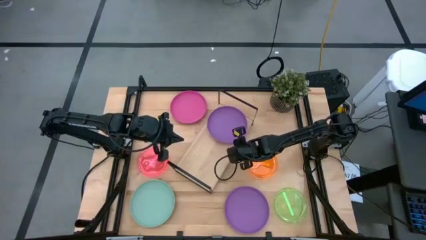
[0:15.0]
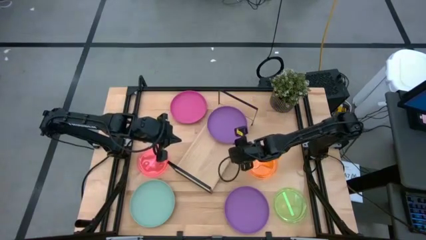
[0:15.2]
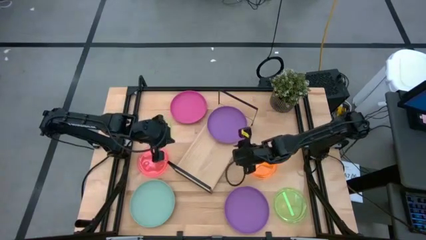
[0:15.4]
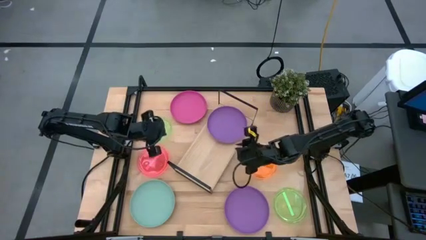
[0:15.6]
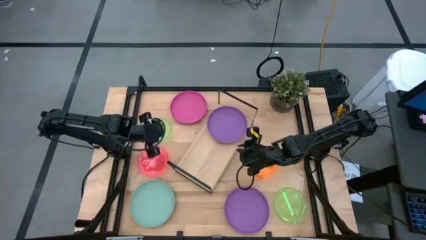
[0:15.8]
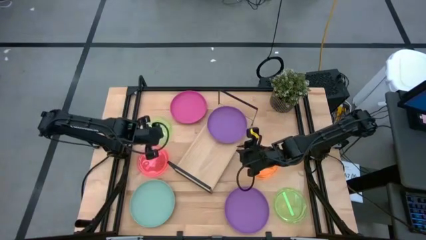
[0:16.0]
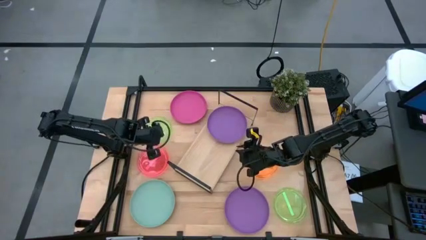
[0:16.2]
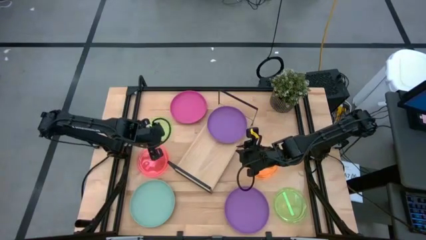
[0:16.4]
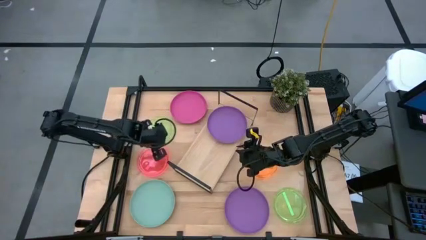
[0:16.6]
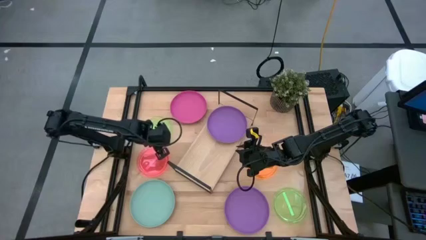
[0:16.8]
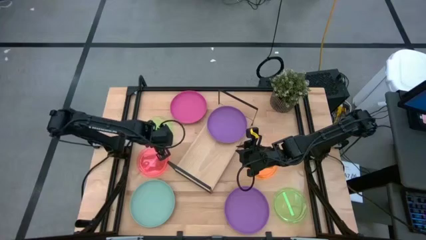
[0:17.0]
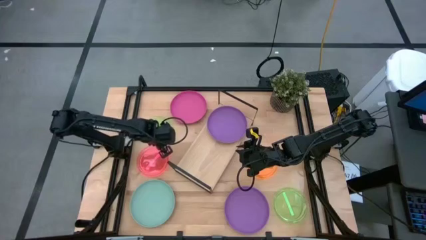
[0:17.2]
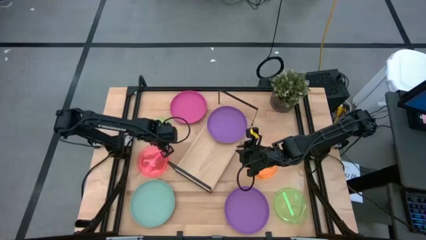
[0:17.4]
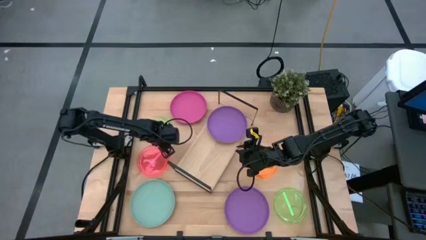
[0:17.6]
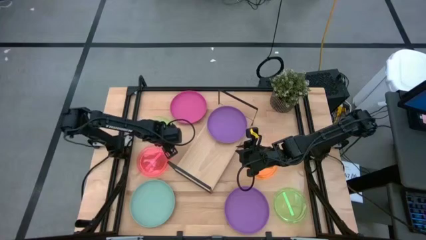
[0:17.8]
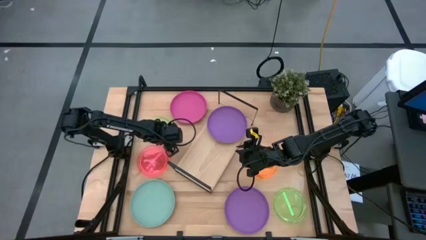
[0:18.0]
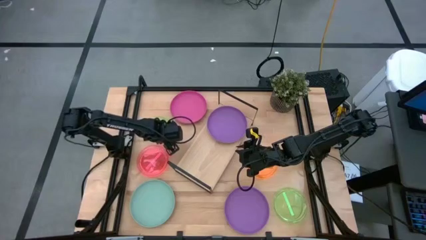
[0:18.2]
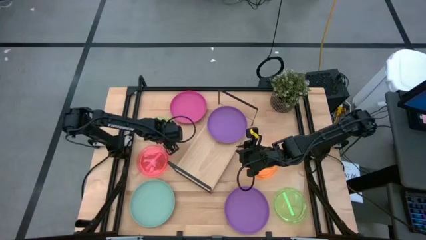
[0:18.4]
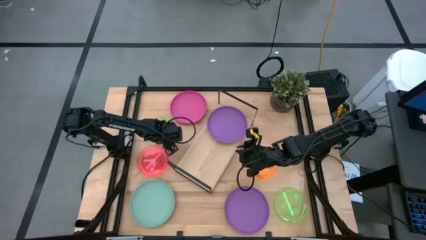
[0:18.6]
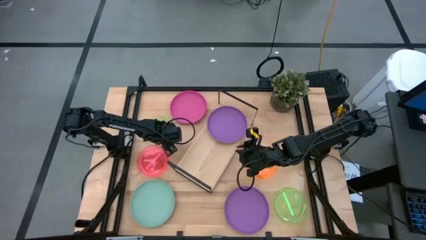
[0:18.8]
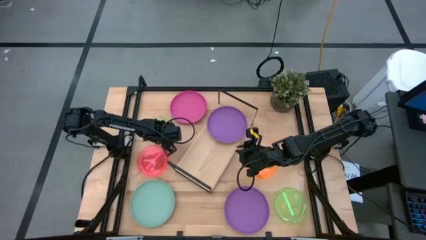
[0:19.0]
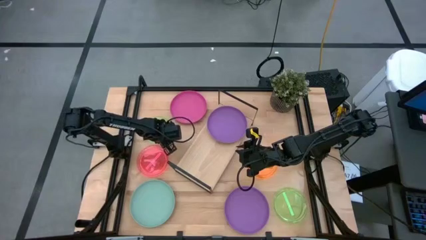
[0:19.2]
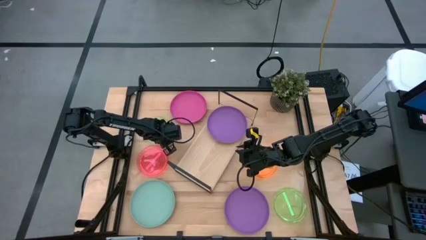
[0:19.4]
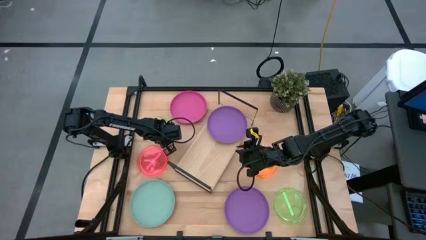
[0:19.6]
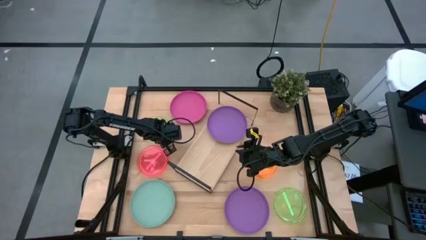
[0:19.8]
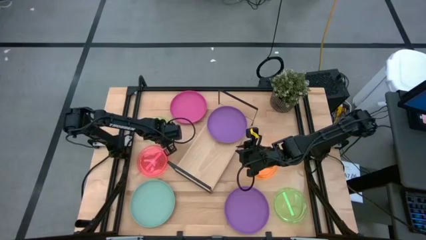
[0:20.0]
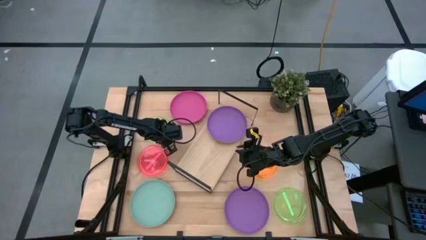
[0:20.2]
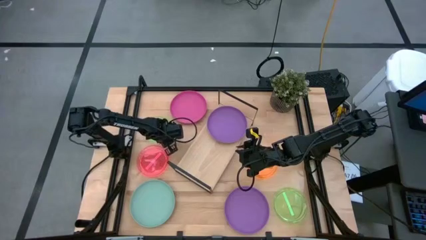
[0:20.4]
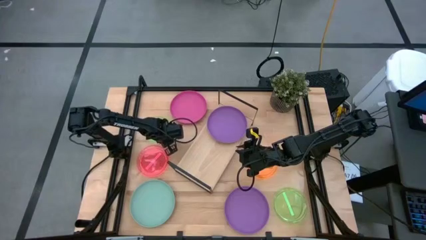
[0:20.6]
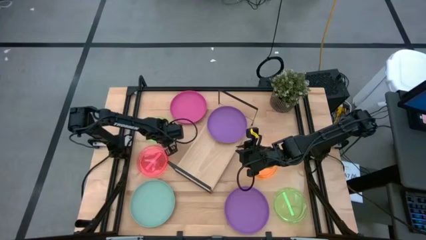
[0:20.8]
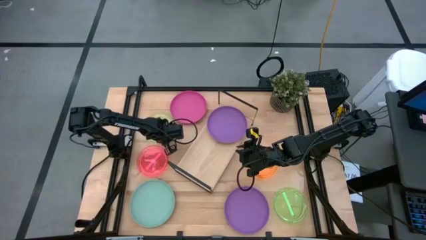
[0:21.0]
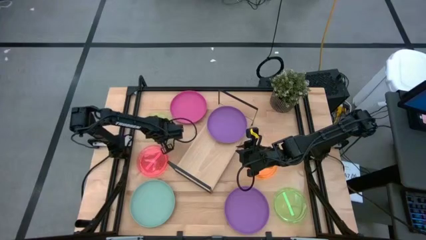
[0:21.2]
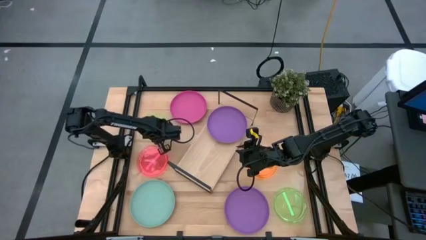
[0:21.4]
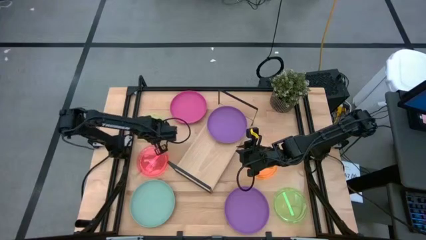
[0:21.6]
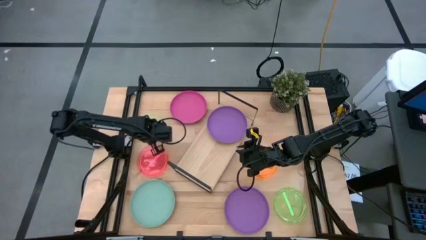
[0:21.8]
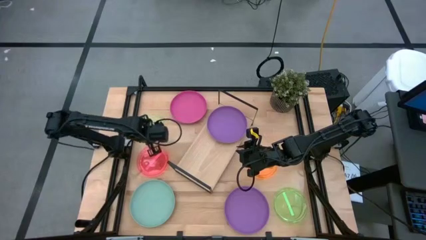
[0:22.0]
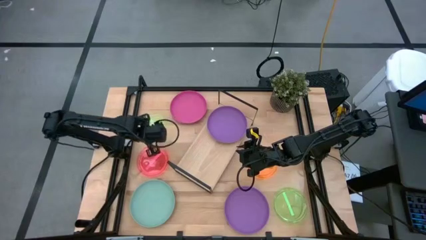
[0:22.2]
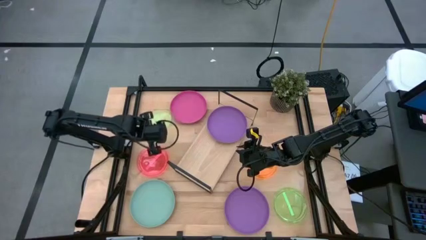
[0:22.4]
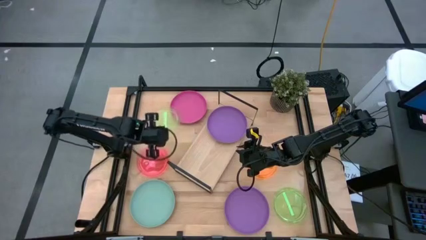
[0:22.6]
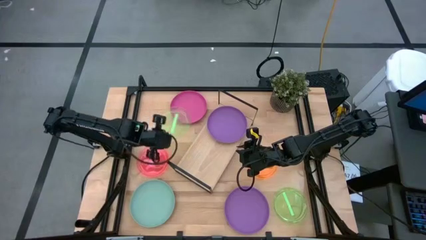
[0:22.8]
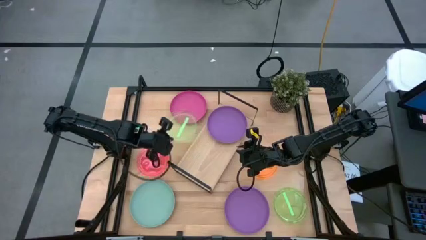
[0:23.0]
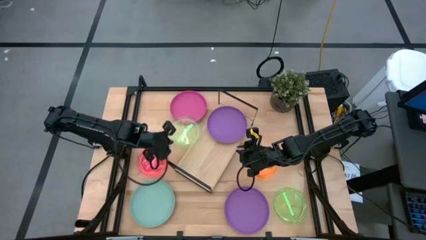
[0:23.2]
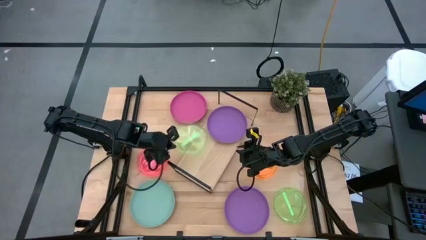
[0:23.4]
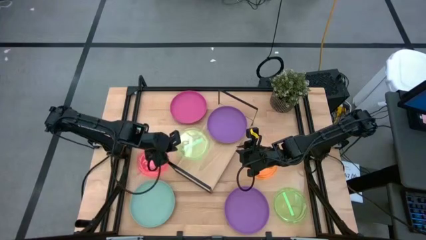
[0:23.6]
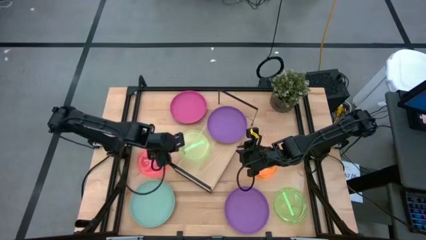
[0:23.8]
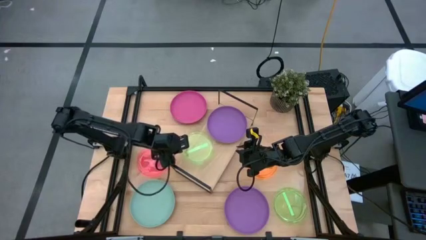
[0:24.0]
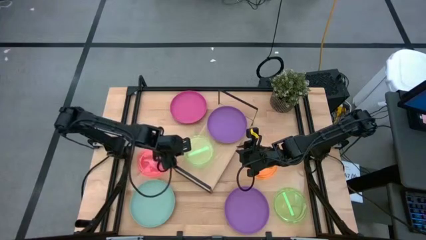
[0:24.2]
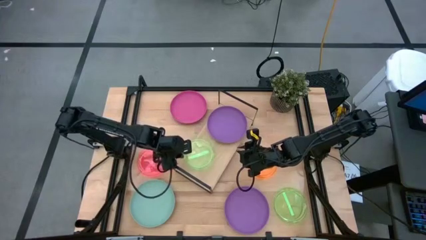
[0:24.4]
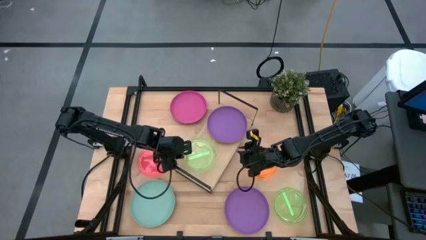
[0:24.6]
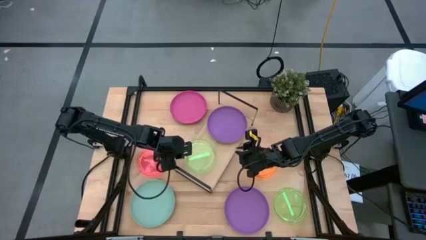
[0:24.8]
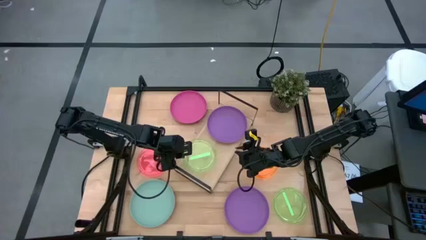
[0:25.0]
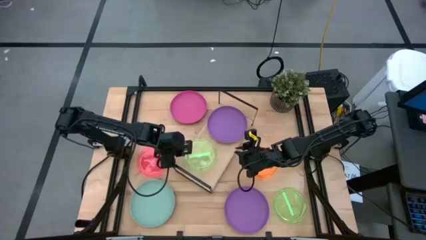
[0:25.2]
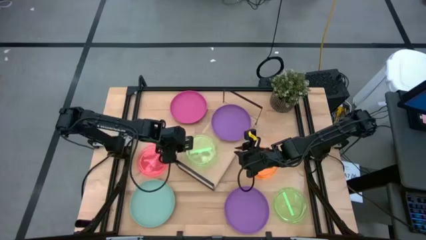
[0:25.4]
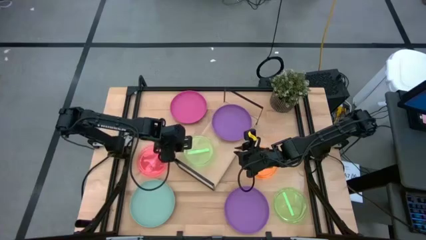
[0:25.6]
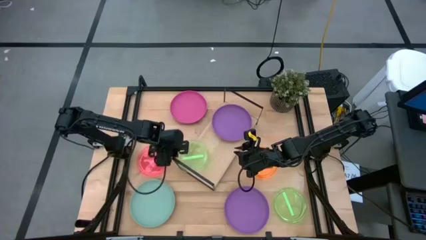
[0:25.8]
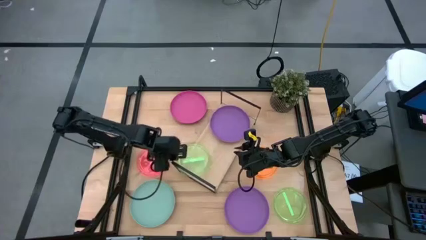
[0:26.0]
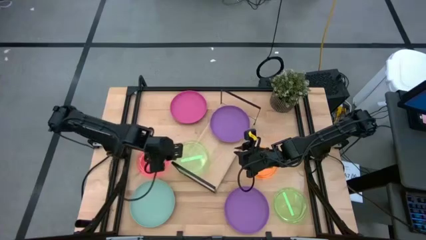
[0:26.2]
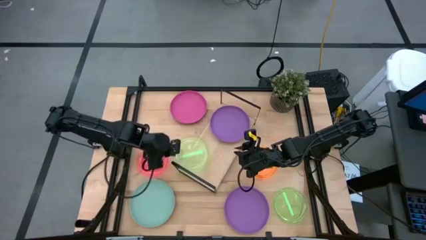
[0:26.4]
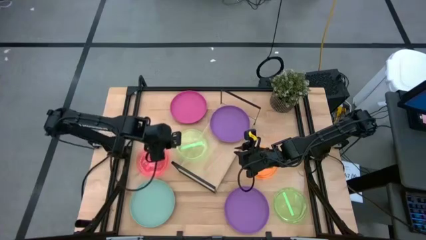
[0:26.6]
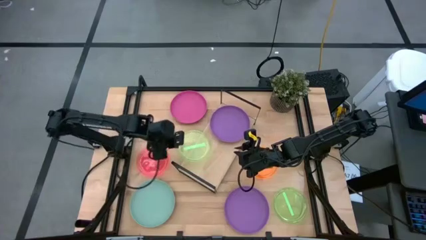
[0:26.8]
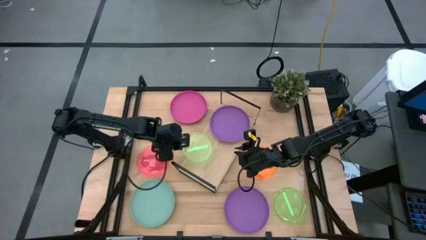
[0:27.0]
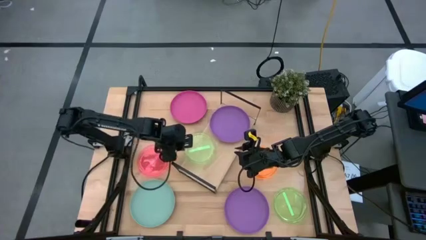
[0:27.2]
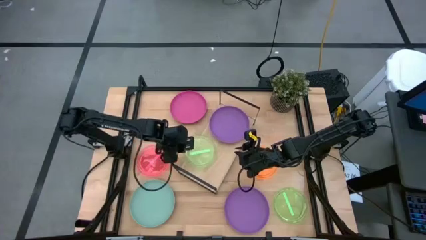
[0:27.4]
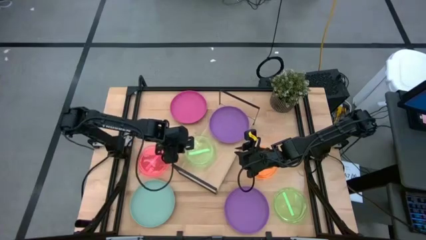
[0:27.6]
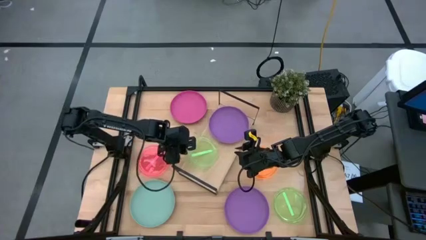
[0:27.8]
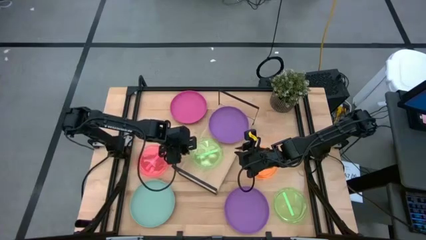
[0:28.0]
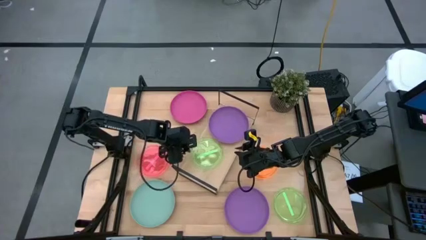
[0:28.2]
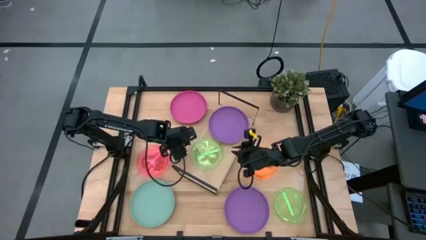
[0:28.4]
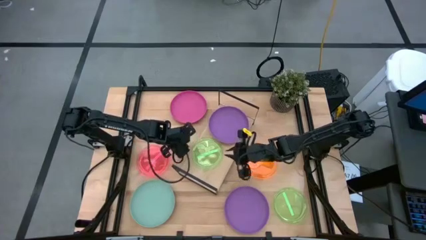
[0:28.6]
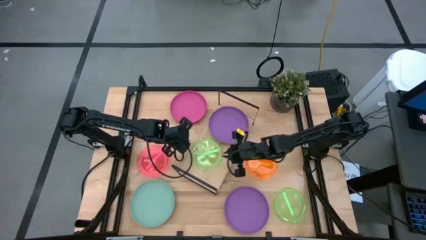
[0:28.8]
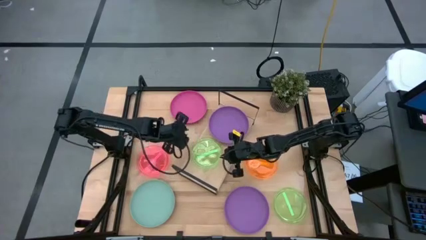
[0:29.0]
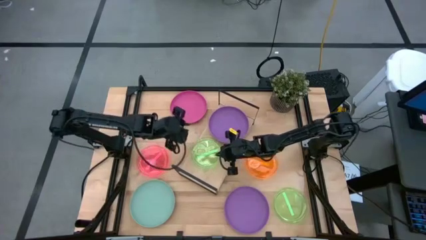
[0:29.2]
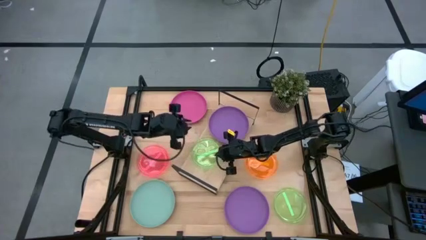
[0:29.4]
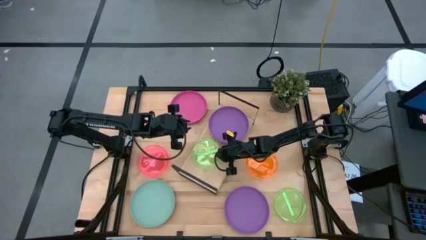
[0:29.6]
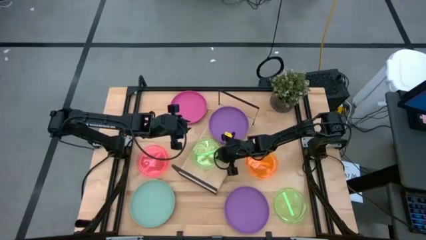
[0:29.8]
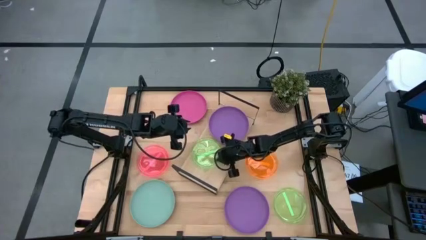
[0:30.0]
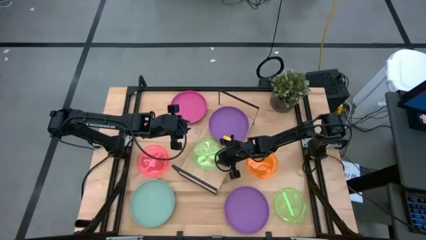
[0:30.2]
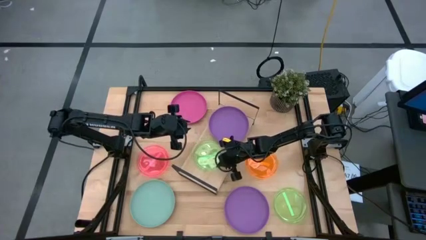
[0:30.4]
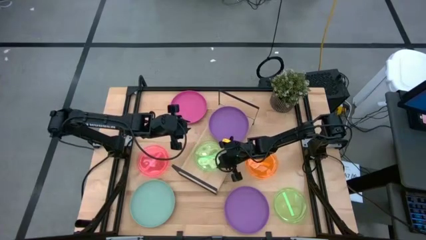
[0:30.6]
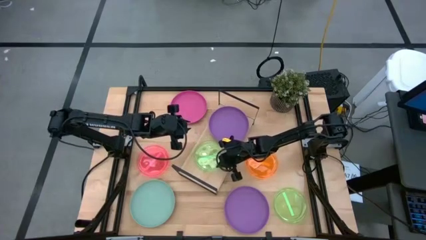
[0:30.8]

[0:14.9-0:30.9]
Task: Place and stack plates onto a shelf
Put the top green plate on the shelf
